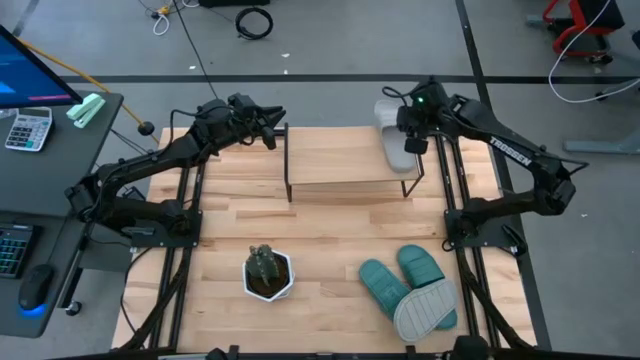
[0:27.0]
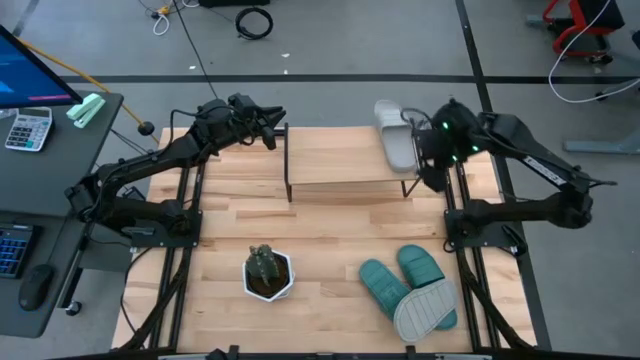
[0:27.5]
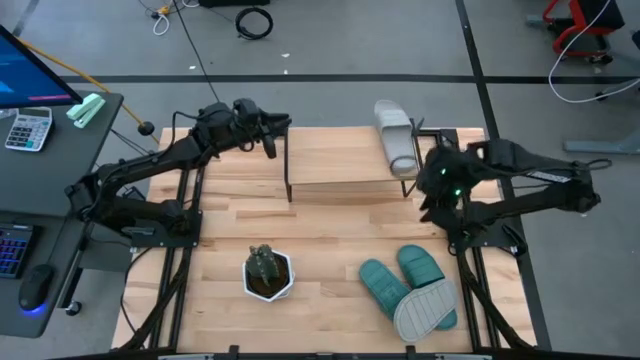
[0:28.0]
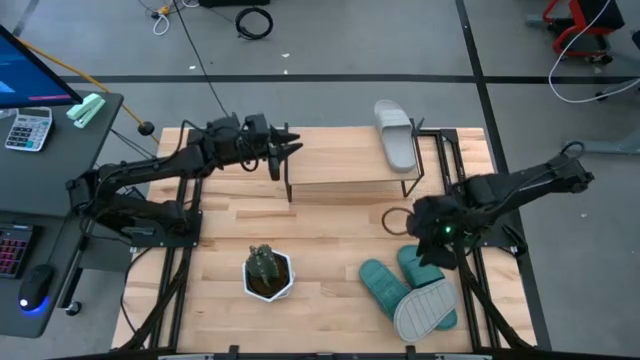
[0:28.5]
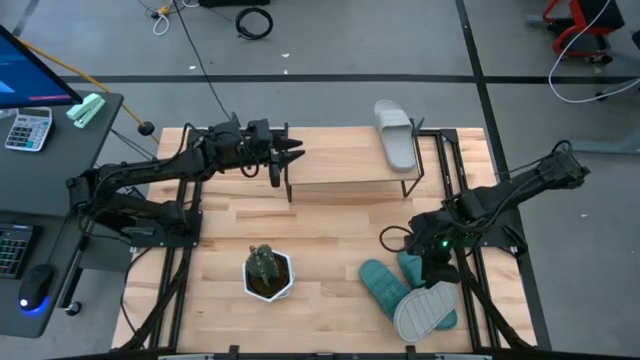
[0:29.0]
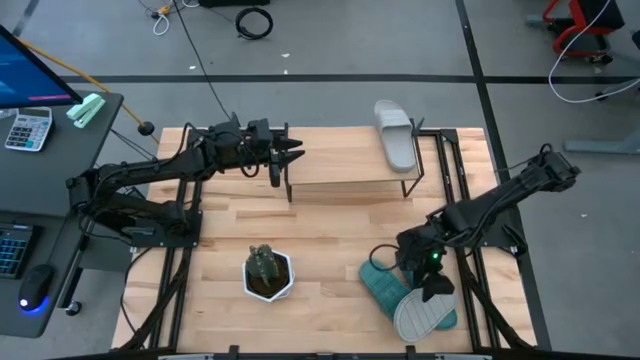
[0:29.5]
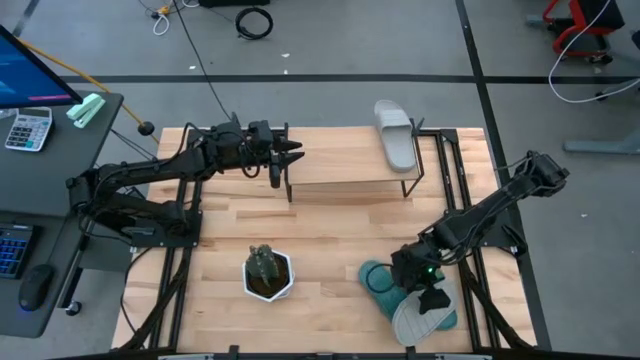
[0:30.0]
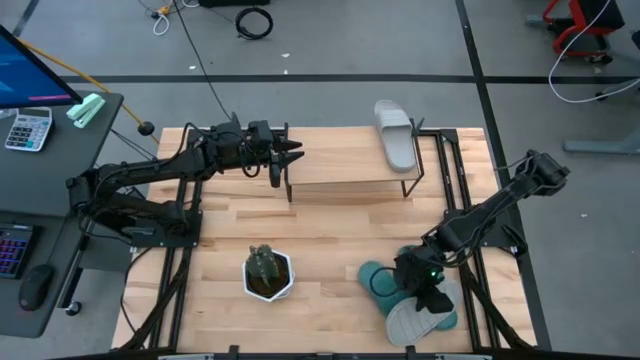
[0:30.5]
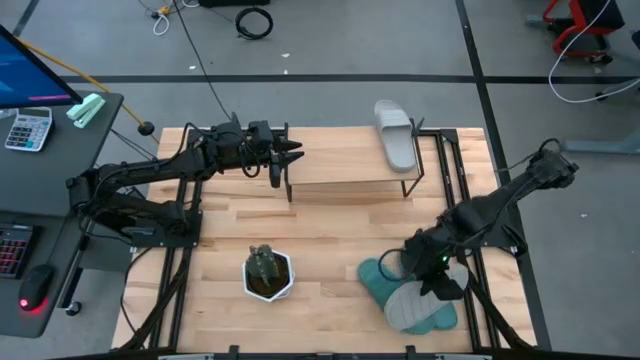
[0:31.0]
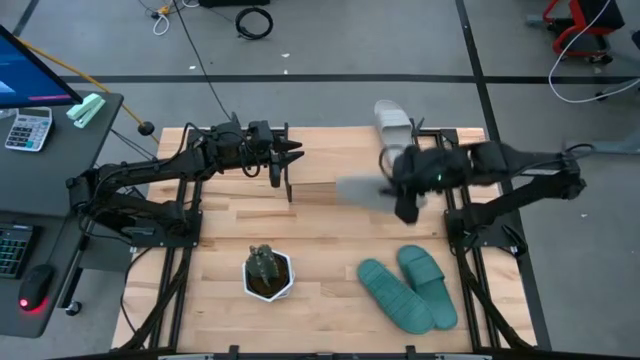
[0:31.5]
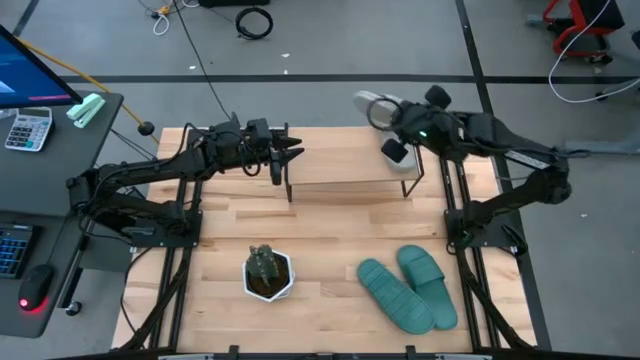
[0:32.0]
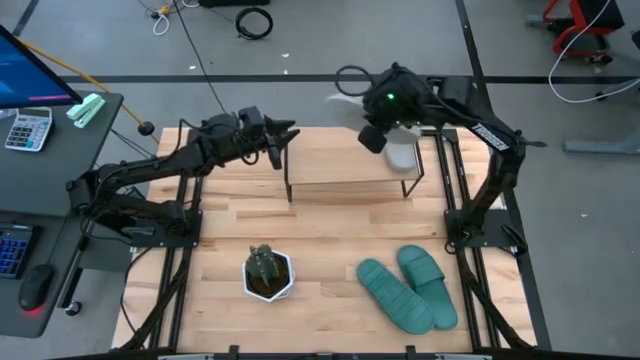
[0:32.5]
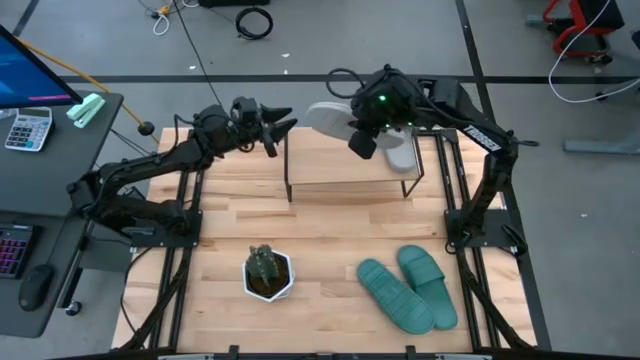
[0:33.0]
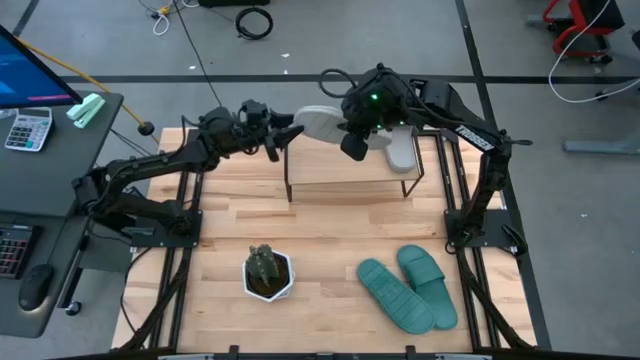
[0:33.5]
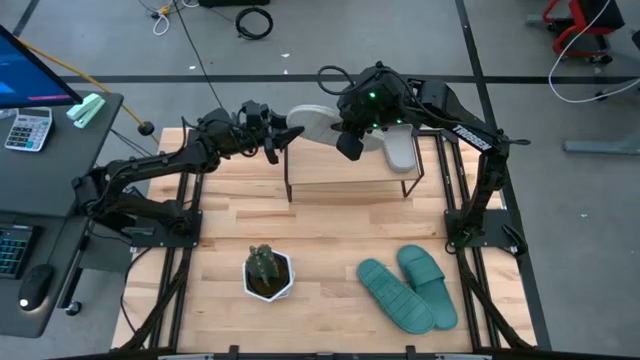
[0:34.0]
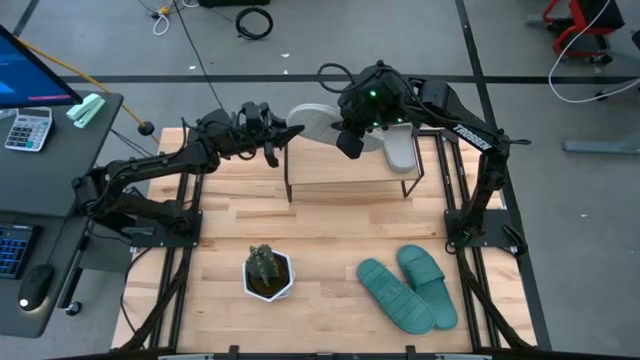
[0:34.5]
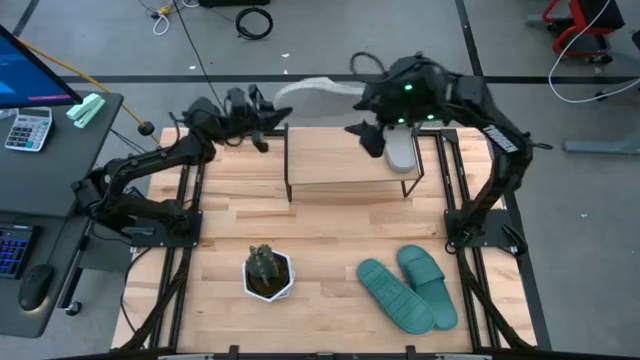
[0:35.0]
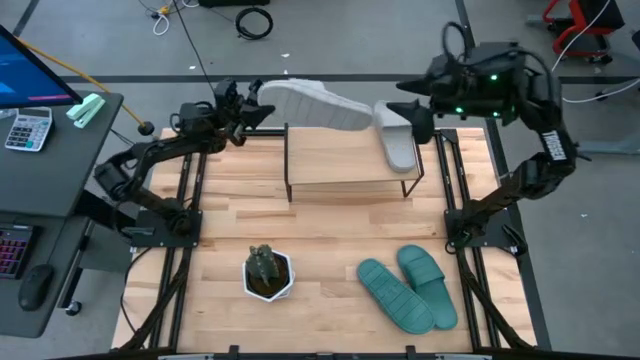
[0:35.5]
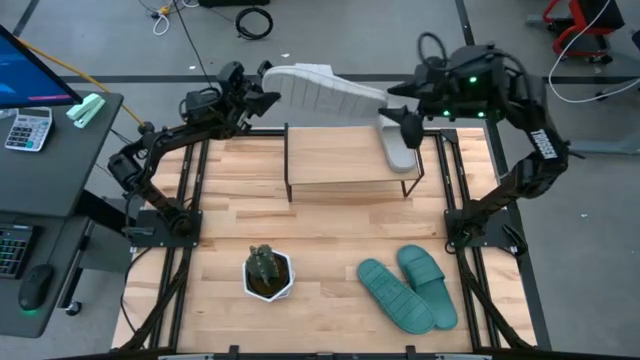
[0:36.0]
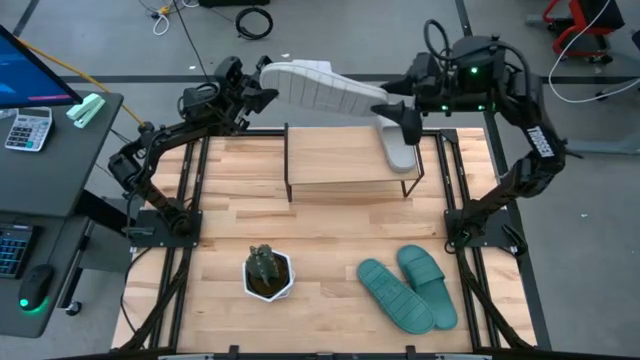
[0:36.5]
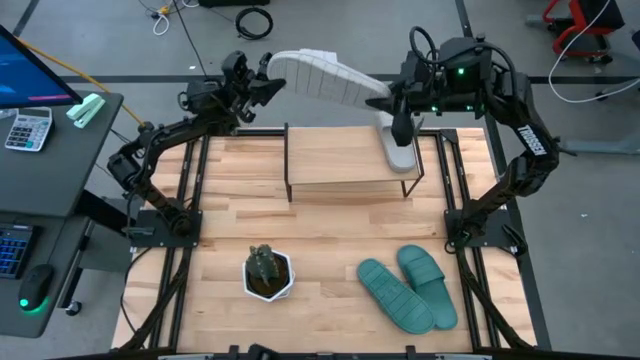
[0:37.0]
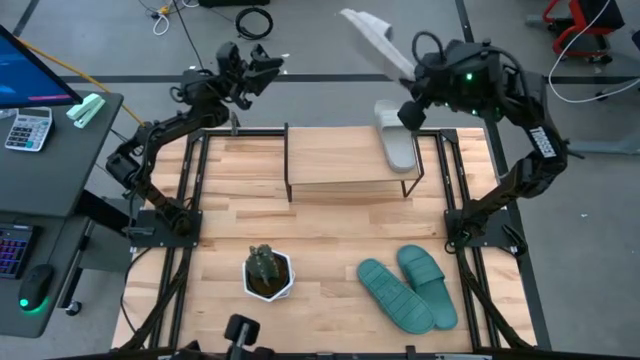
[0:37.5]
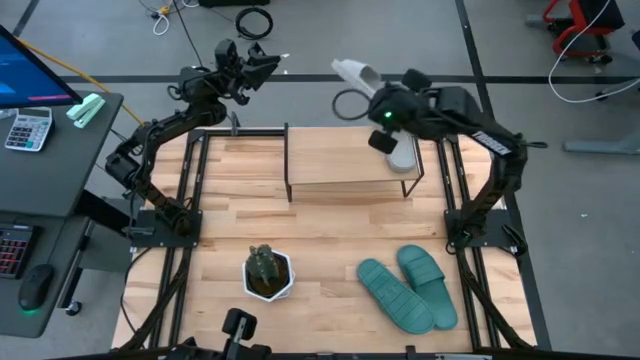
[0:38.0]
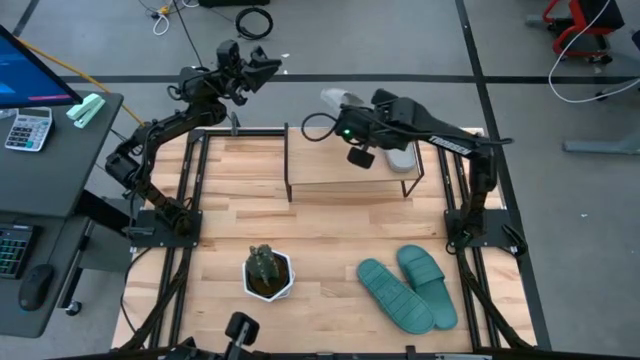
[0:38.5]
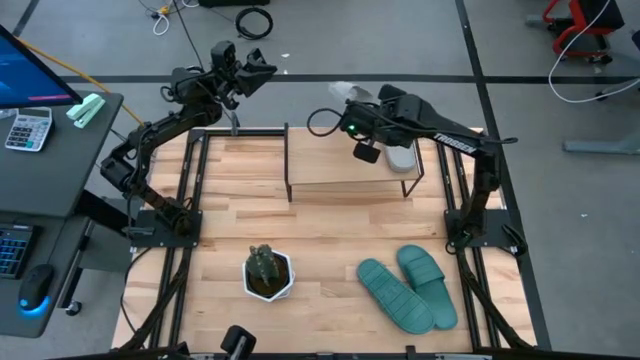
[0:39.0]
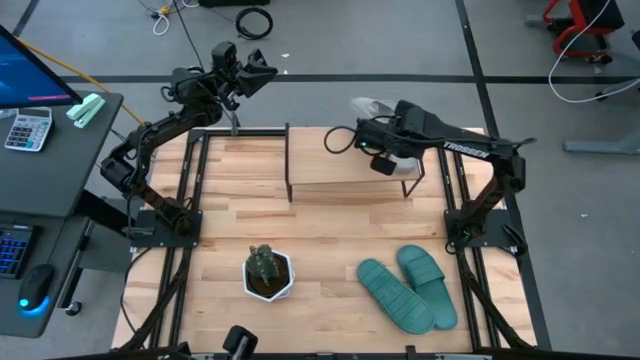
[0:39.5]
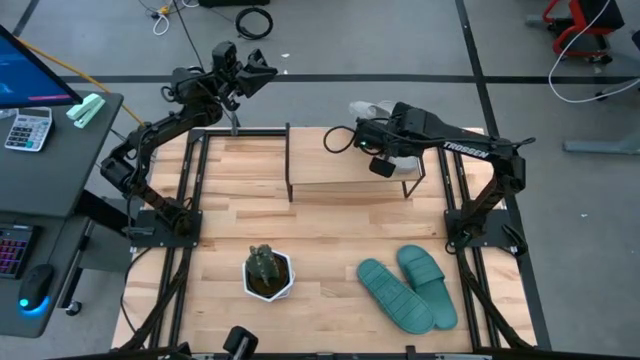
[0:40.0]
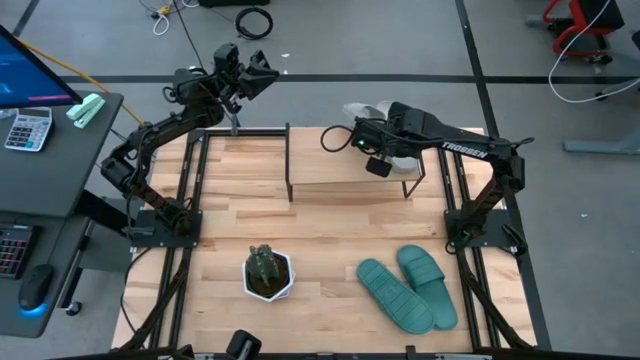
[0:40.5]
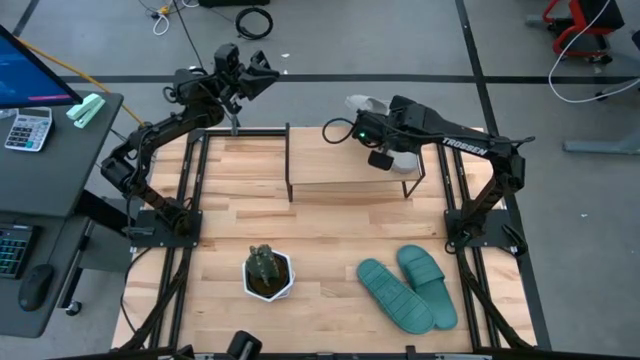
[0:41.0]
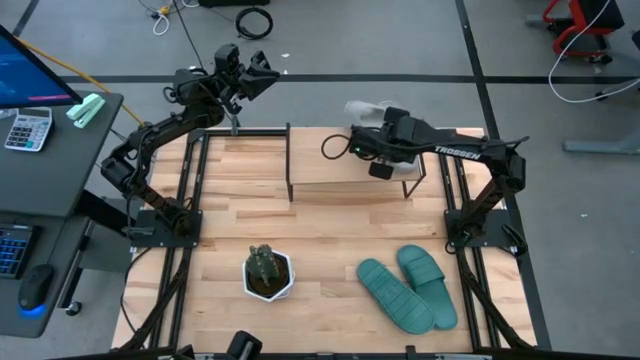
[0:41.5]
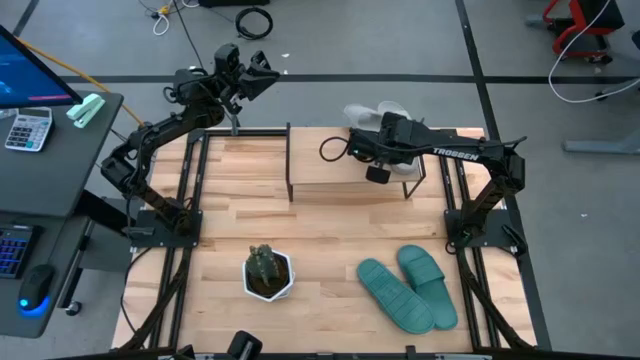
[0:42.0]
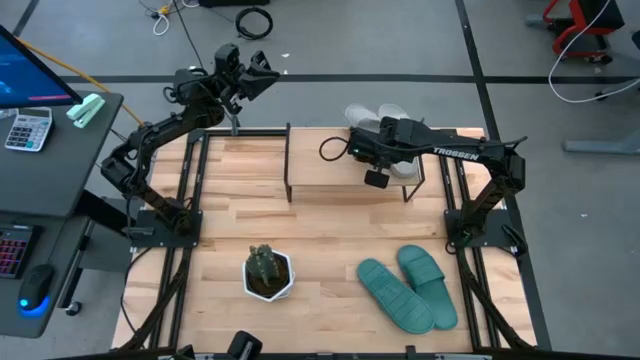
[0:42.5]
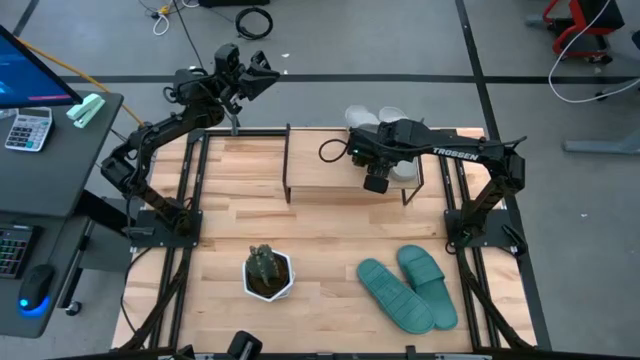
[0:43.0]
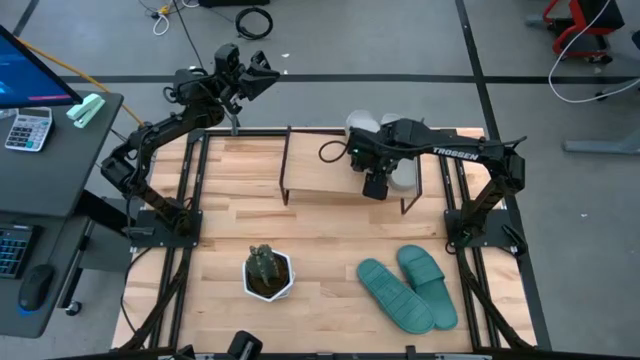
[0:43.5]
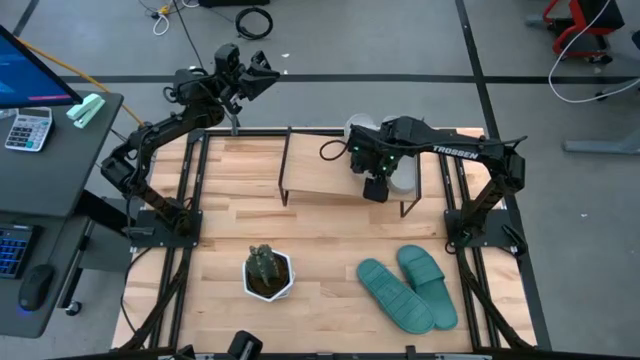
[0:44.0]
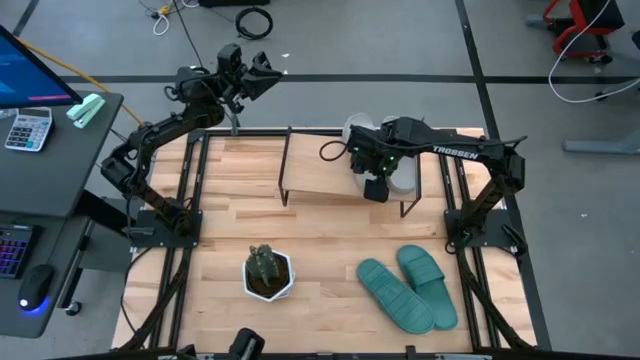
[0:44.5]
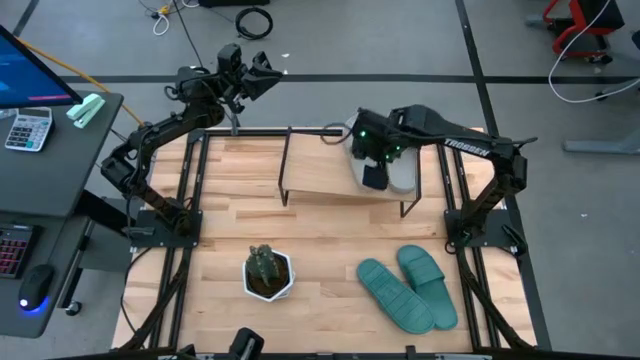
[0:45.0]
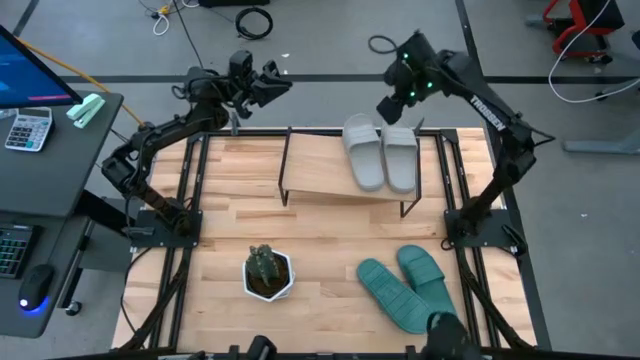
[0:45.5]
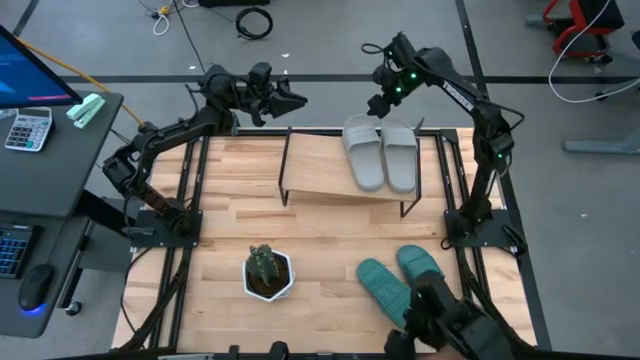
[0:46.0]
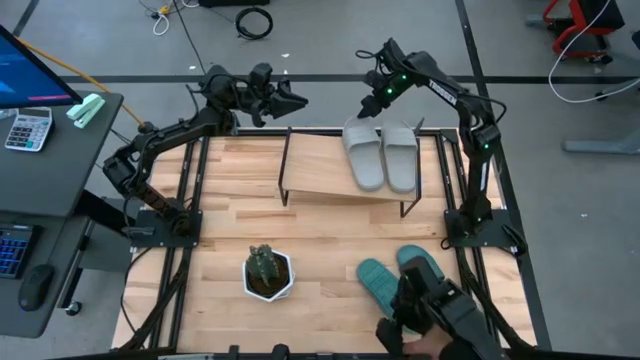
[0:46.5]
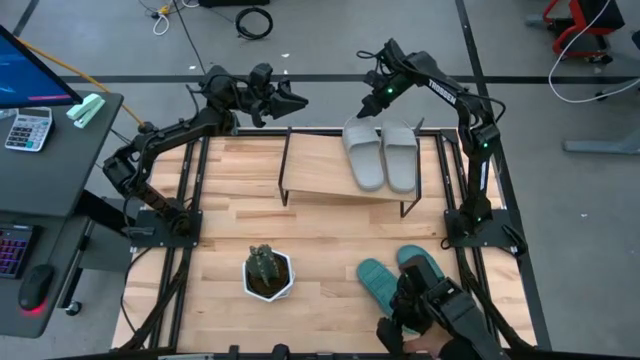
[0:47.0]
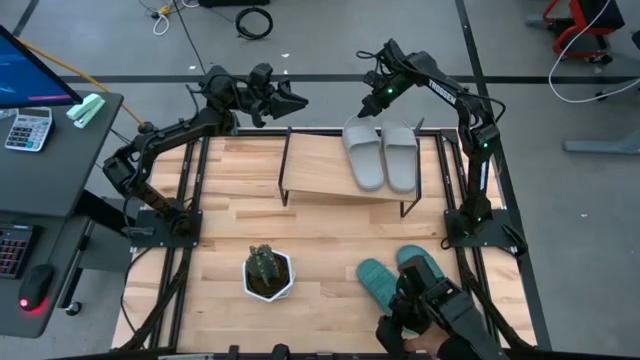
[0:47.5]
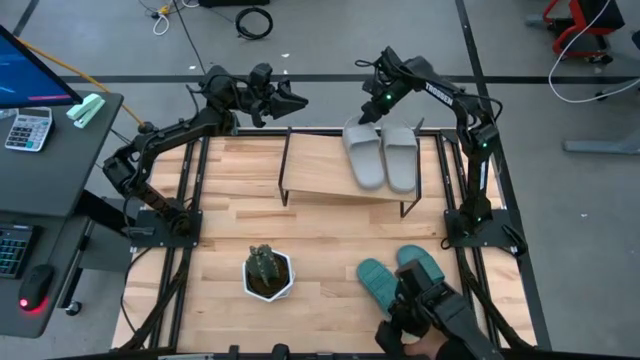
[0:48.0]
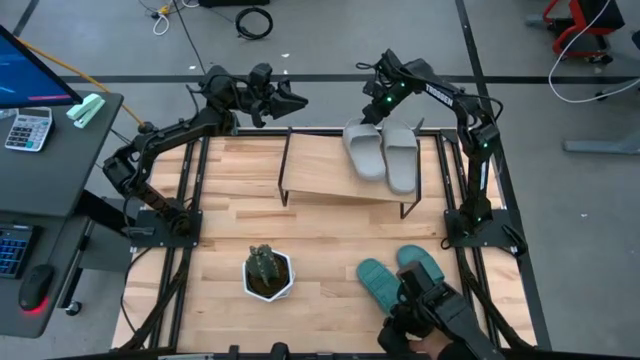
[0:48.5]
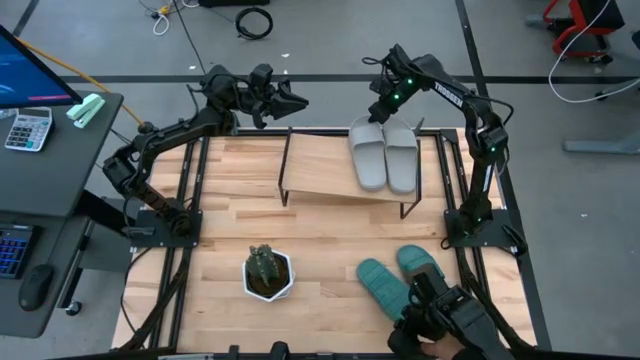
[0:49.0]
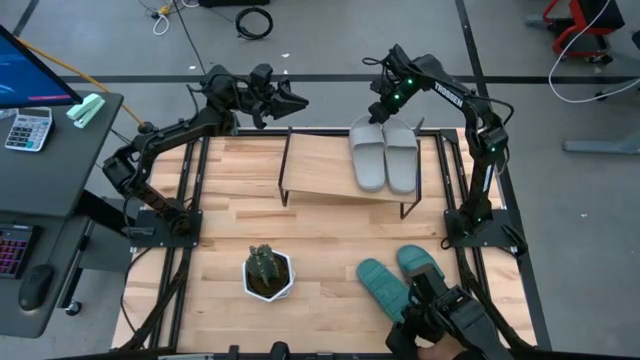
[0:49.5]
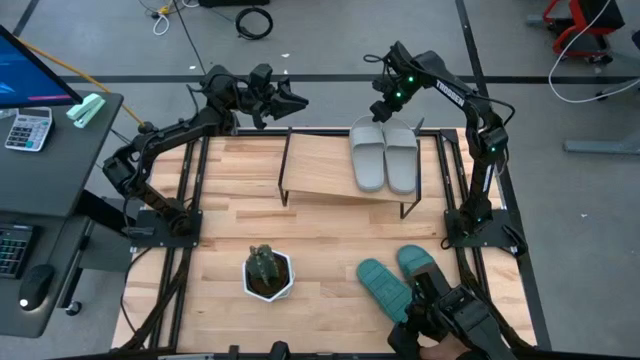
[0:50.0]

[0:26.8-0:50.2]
Task: Pick and place slides into the shelf
Put the gray slide on the shelf
